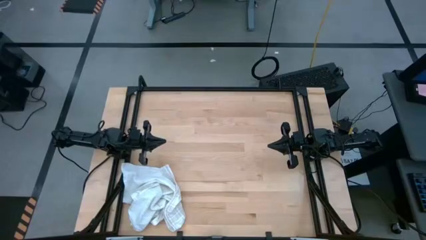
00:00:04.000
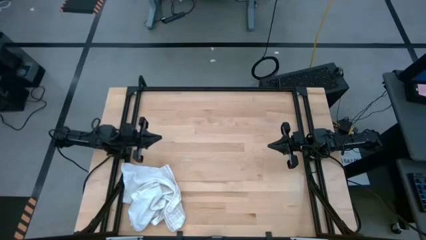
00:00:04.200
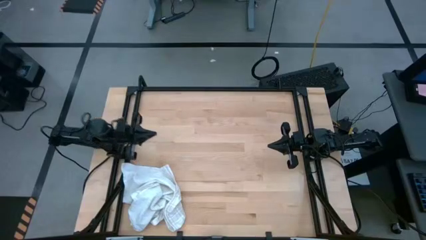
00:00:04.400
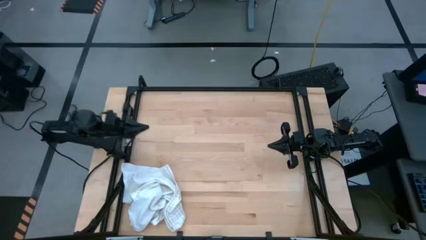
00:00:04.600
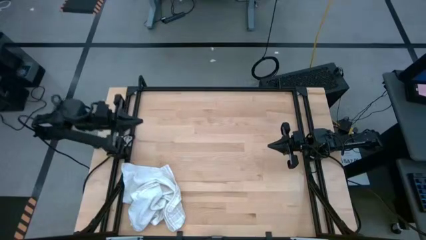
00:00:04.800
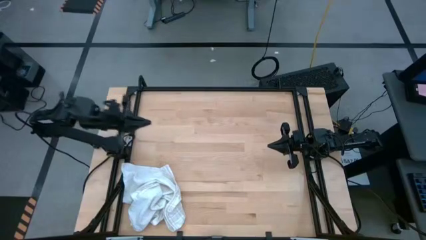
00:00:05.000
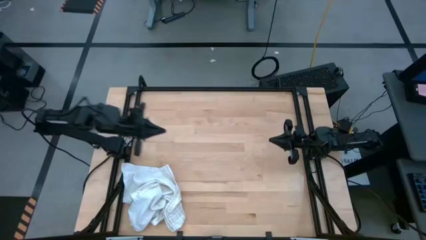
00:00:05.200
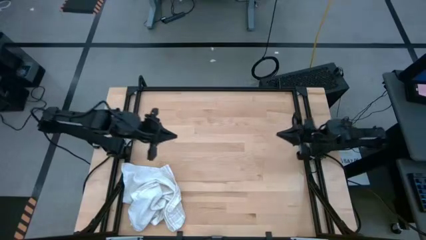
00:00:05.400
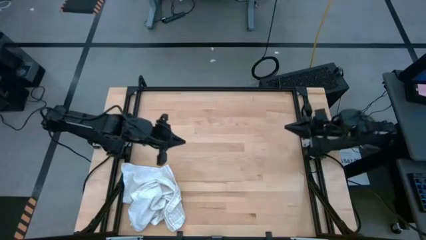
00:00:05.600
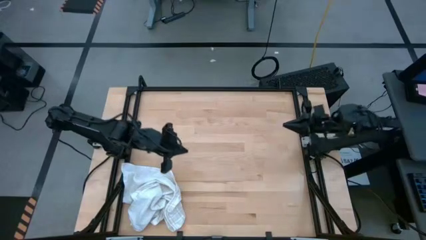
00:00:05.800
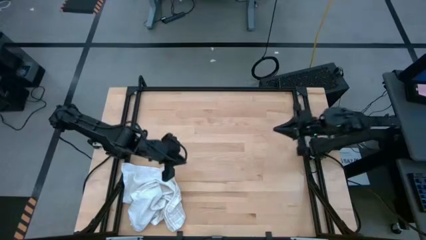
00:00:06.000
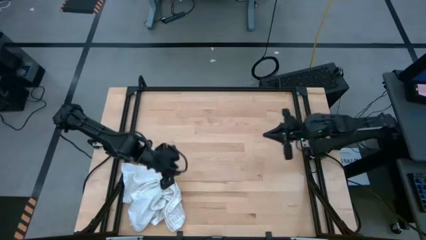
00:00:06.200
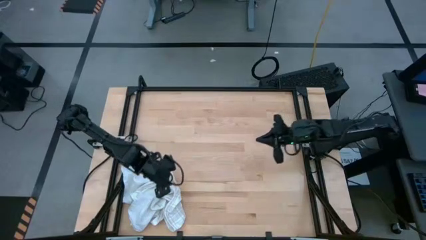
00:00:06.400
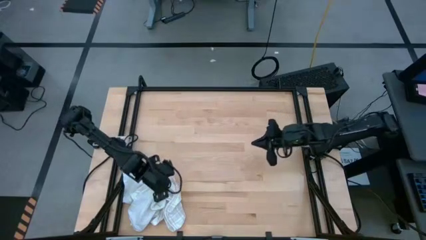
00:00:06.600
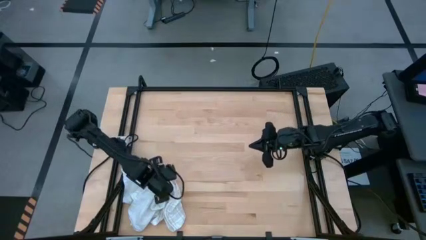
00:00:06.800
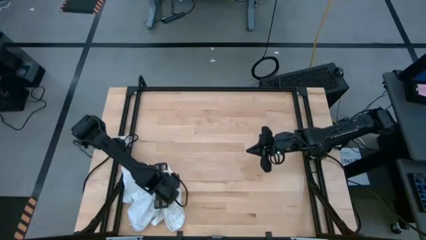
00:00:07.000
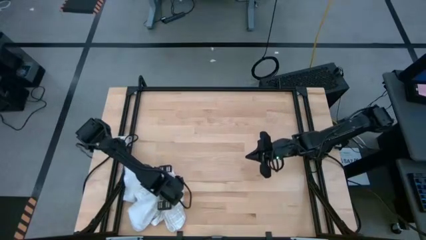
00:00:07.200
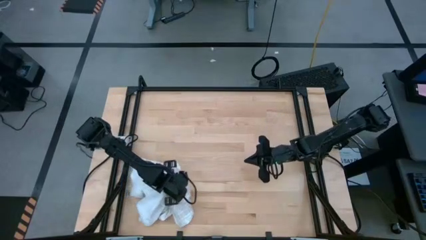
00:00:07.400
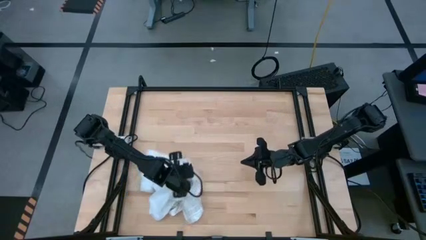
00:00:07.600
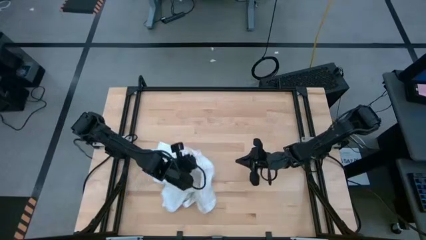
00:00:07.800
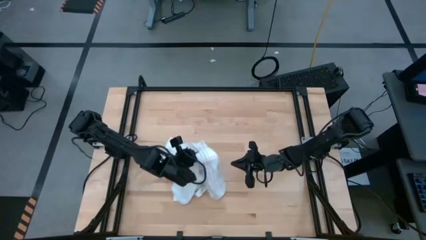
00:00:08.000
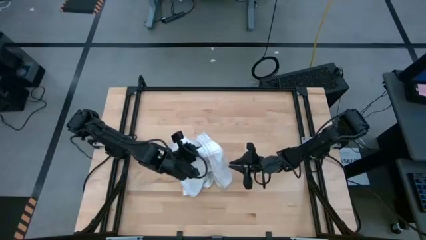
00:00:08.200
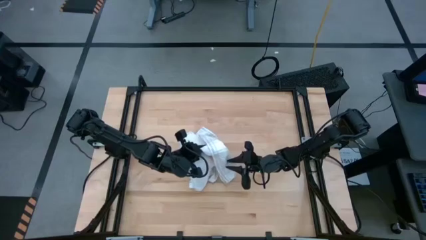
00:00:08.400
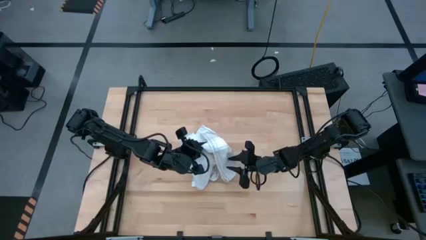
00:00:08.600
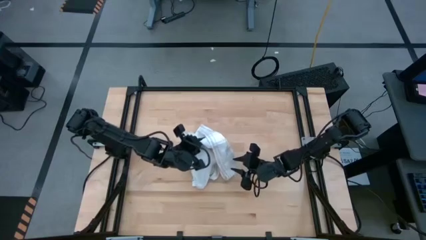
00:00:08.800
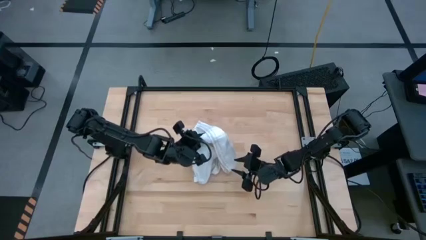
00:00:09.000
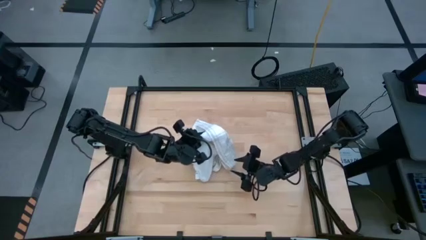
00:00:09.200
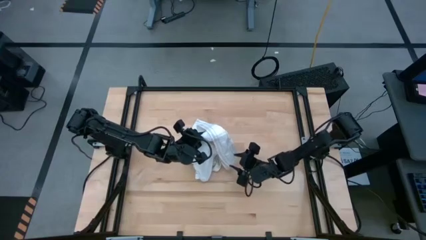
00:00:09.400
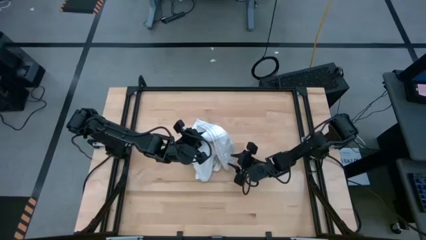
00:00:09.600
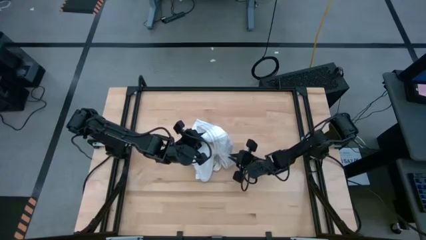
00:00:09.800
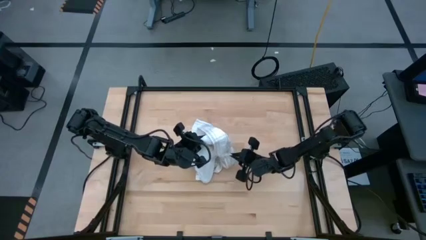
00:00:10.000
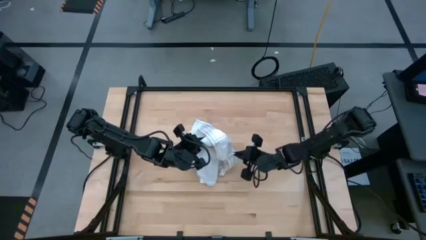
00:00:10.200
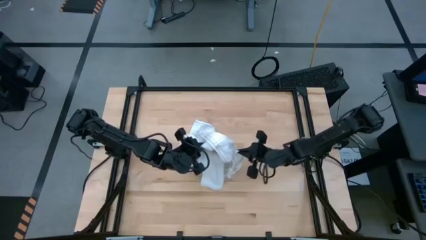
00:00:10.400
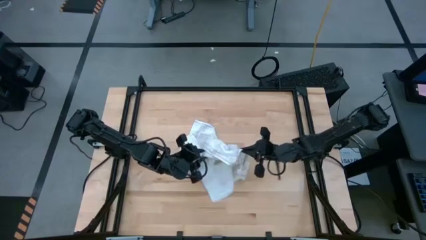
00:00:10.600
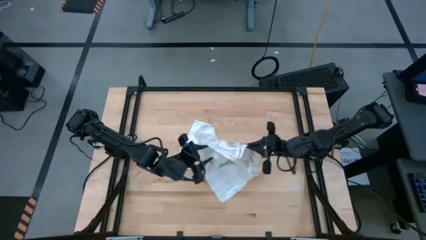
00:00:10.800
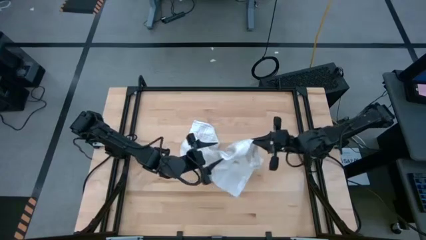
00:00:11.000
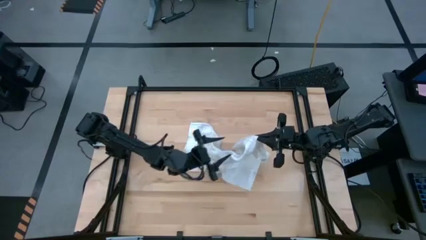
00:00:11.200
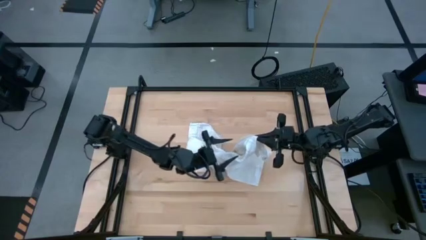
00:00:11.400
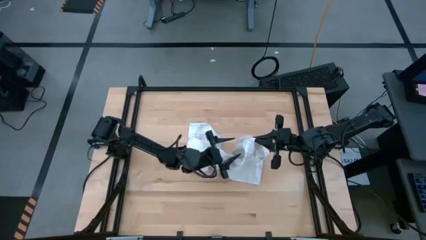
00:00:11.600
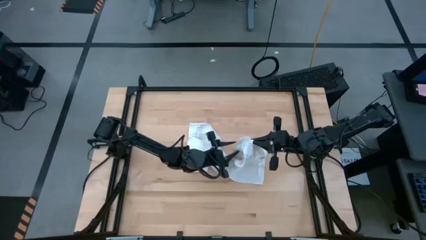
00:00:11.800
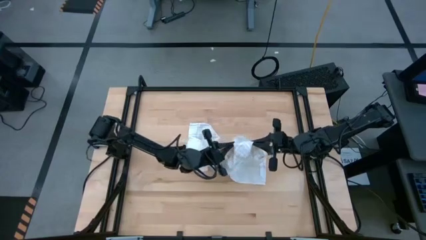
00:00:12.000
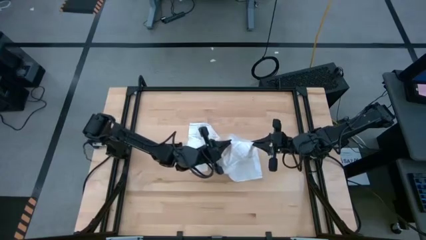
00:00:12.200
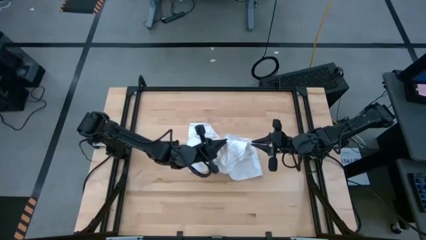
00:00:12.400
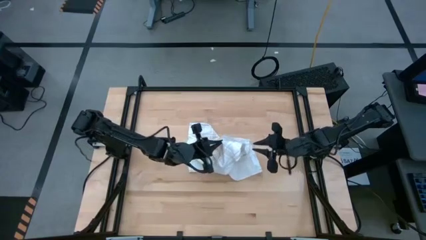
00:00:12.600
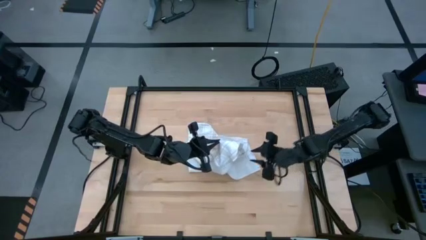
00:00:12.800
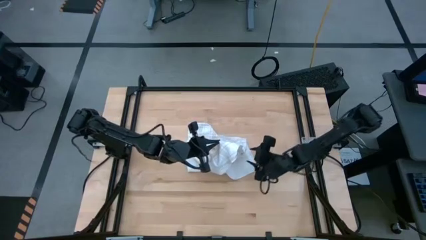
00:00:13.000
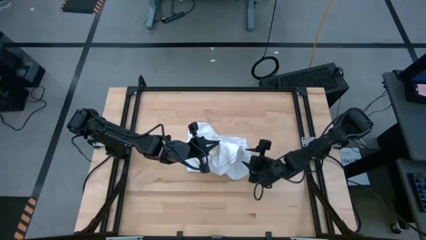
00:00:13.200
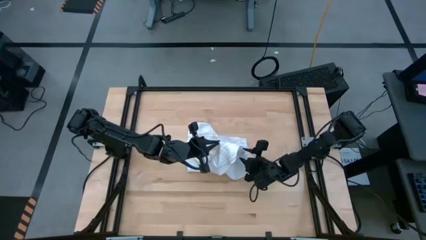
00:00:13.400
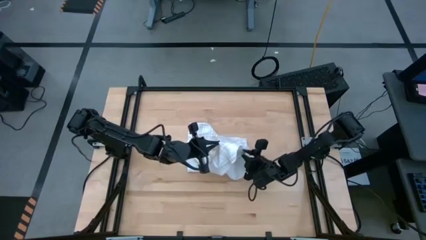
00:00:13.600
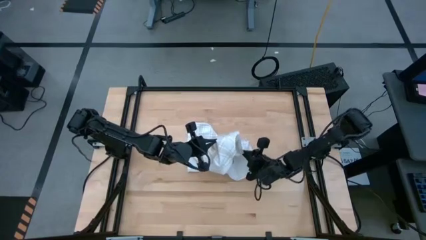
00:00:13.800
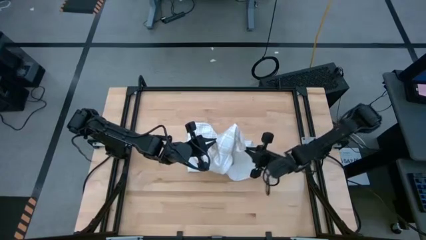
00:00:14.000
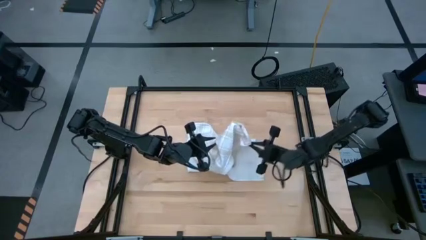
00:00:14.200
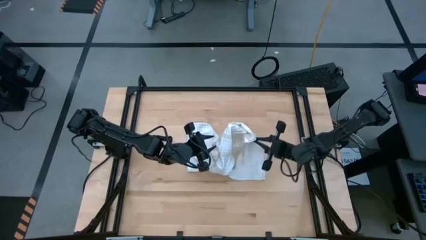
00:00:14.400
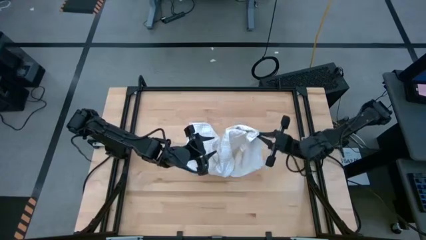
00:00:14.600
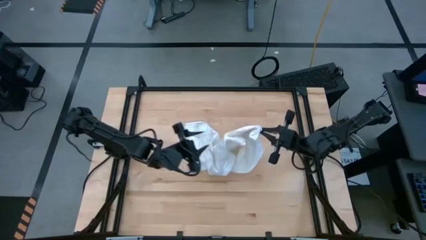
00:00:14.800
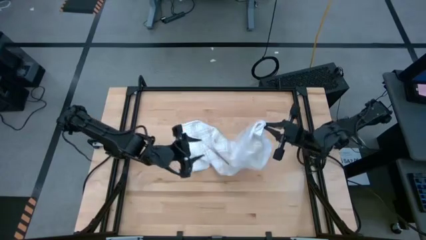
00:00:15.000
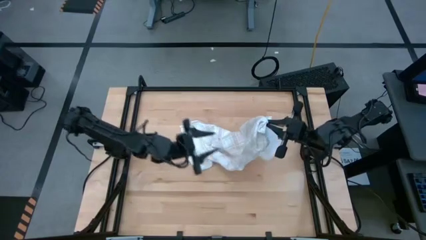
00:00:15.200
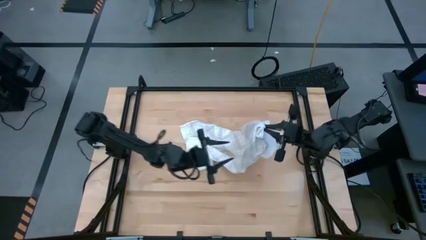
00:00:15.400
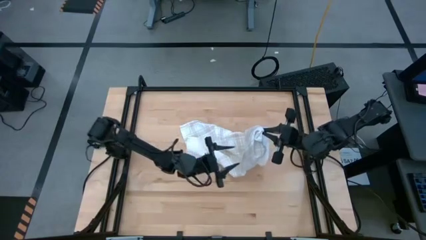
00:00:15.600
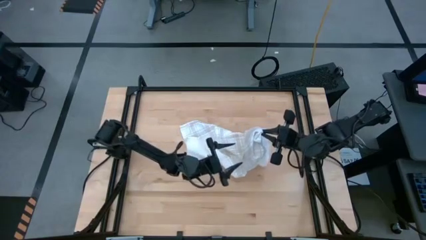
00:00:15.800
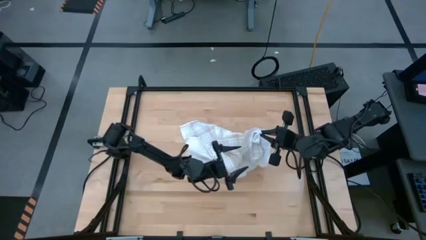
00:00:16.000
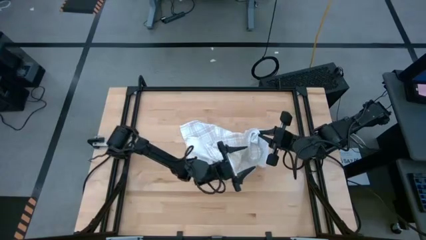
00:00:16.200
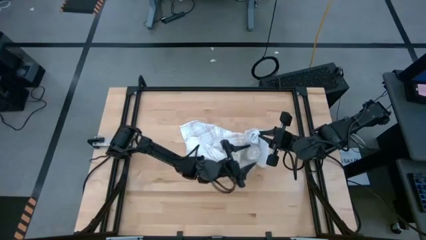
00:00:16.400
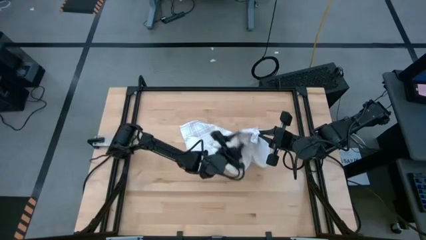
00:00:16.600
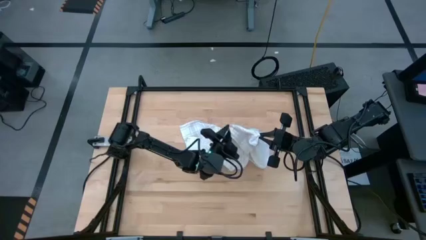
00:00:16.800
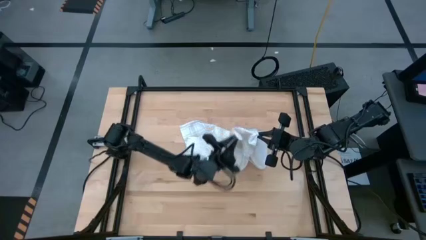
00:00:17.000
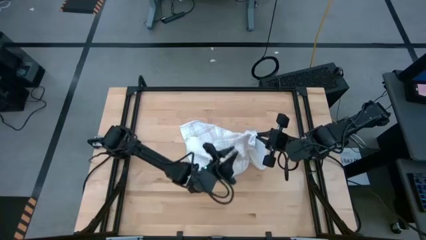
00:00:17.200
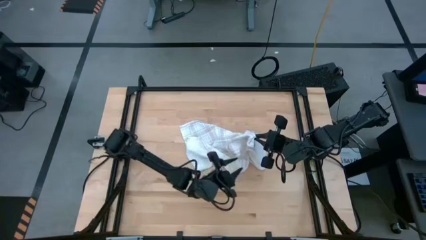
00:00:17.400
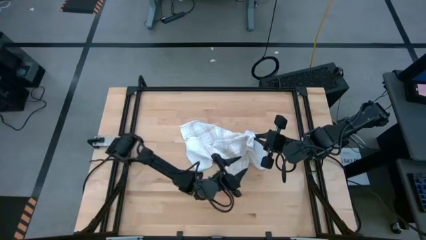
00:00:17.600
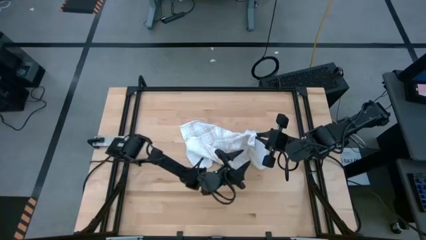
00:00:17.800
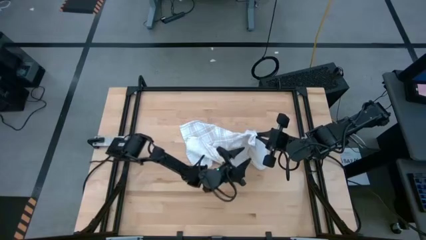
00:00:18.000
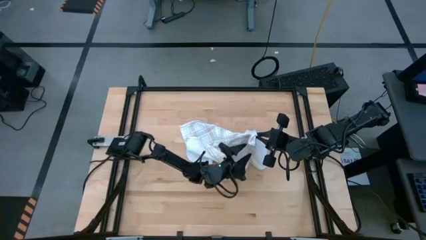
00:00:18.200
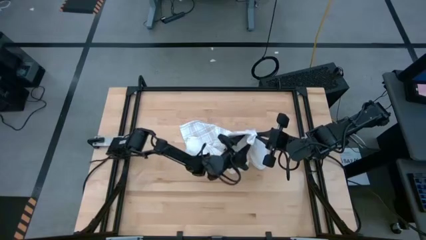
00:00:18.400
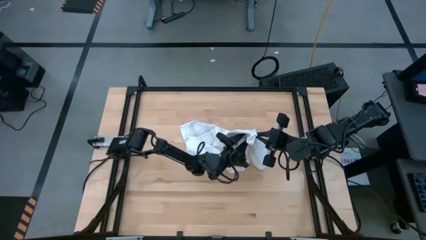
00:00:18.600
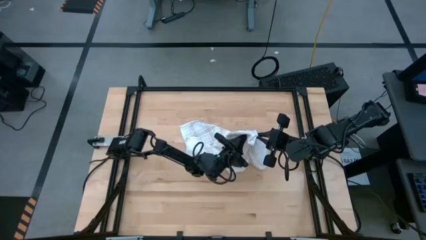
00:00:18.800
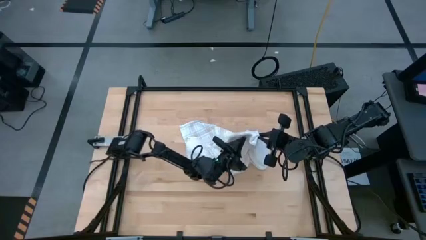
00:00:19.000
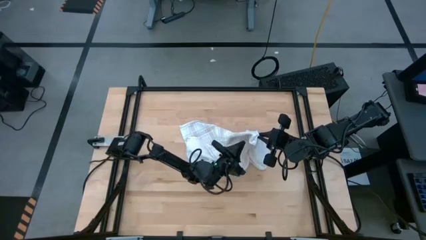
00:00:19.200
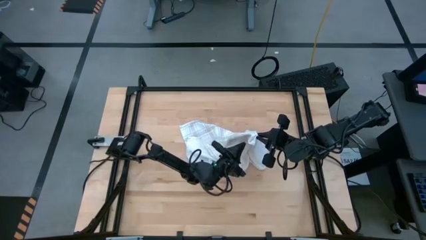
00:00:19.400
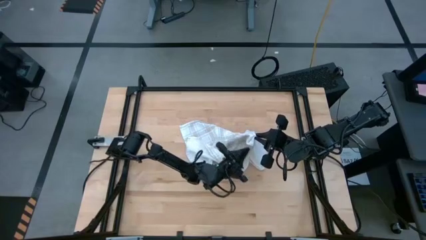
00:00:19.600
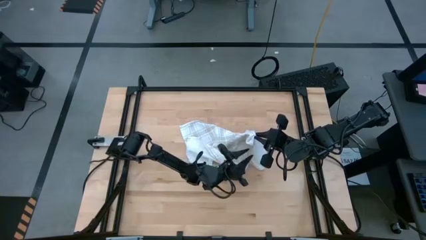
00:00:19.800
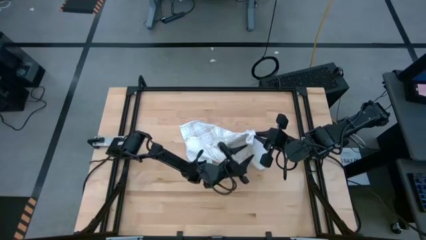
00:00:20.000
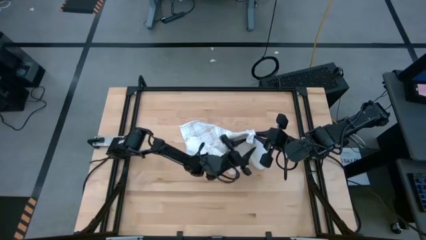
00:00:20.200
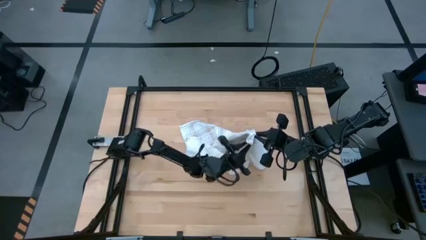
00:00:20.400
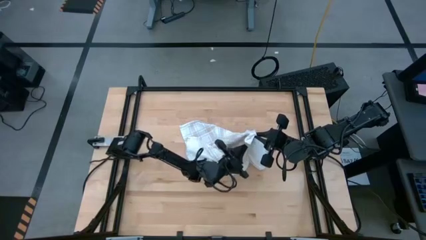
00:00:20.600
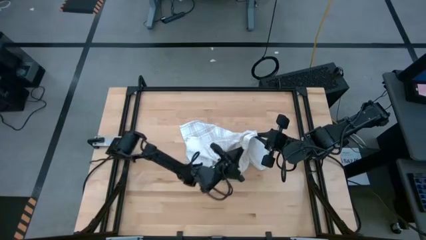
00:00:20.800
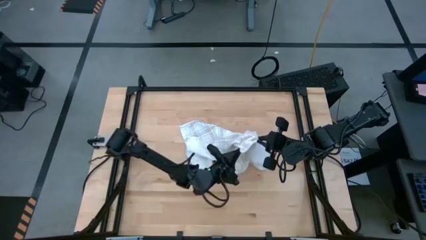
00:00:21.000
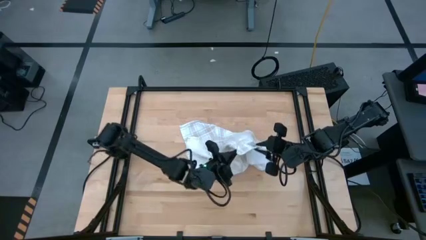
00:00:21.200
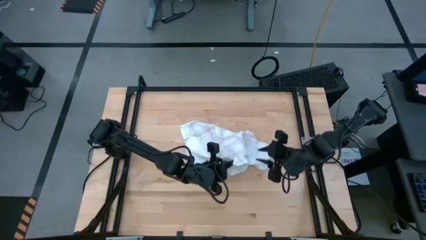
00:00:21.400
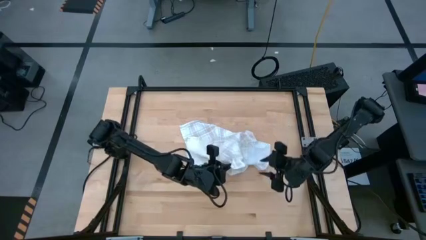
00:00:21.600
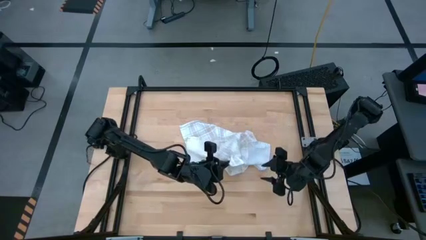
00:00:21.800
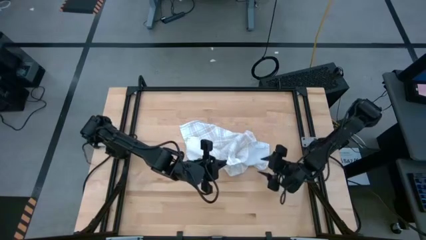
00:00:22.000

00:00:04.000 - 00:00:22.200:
Task: Roll towel into tight, uniform cylinder
Roll the white towel
